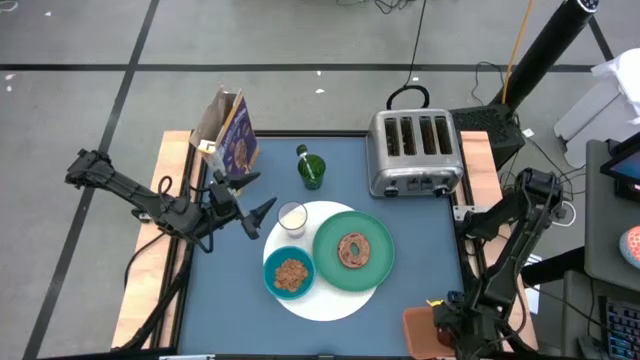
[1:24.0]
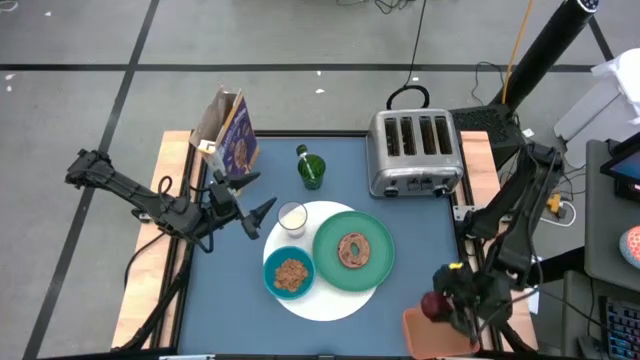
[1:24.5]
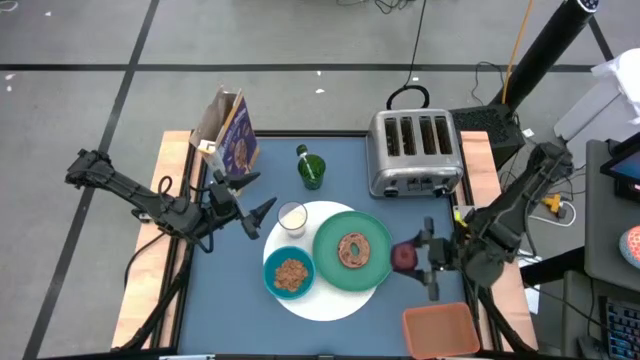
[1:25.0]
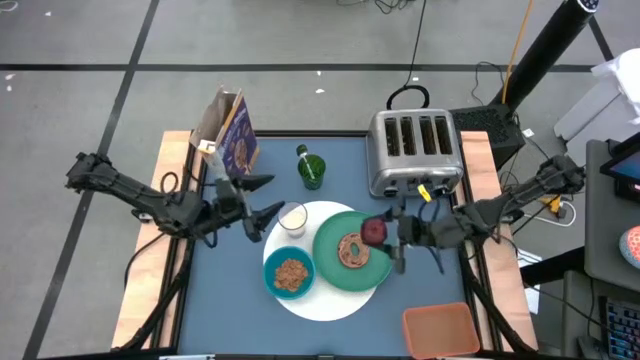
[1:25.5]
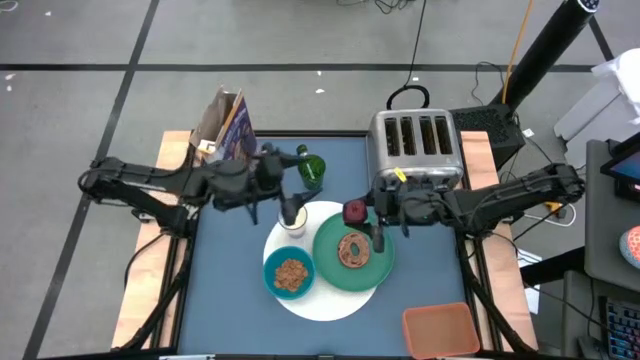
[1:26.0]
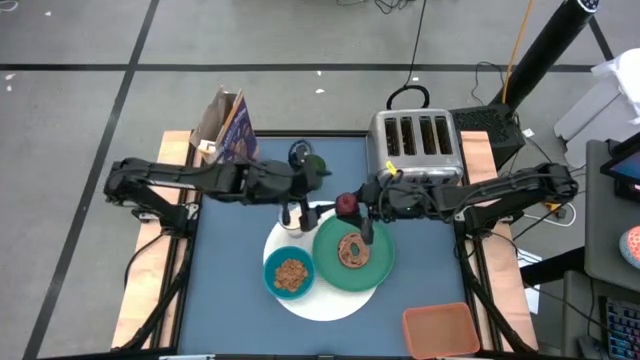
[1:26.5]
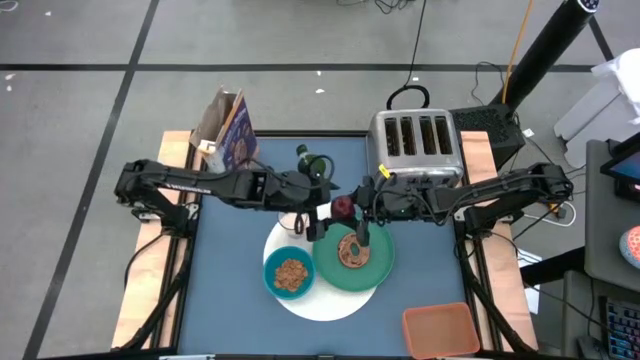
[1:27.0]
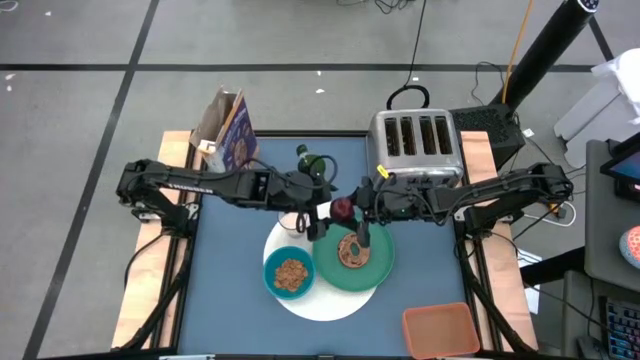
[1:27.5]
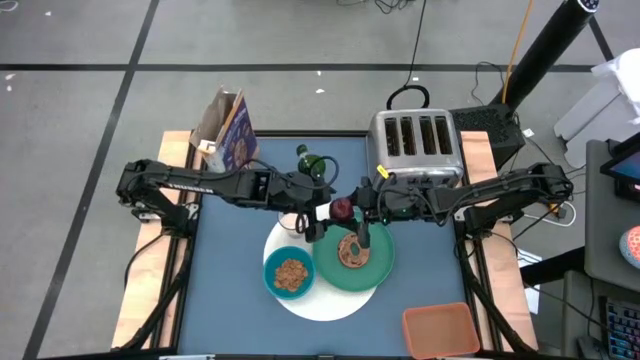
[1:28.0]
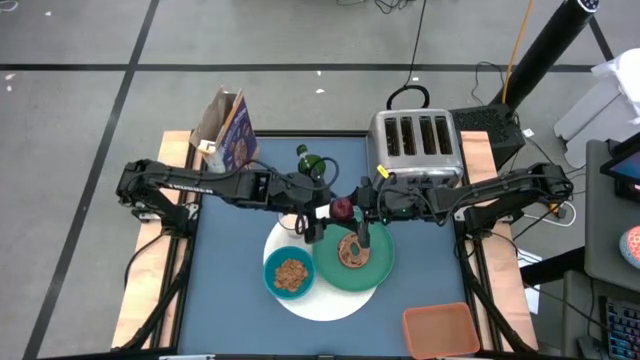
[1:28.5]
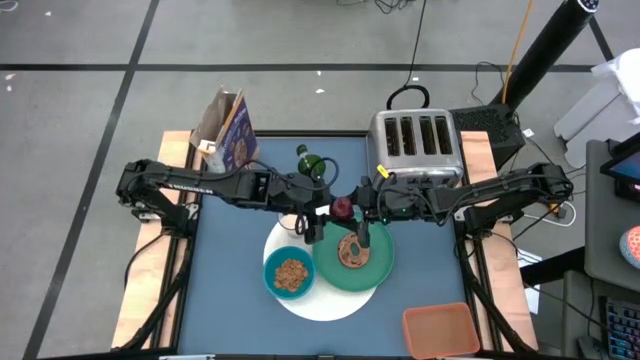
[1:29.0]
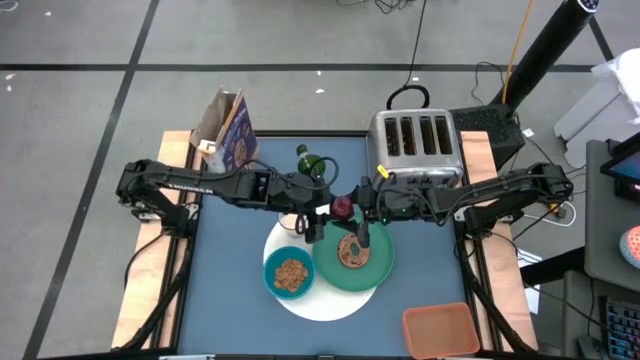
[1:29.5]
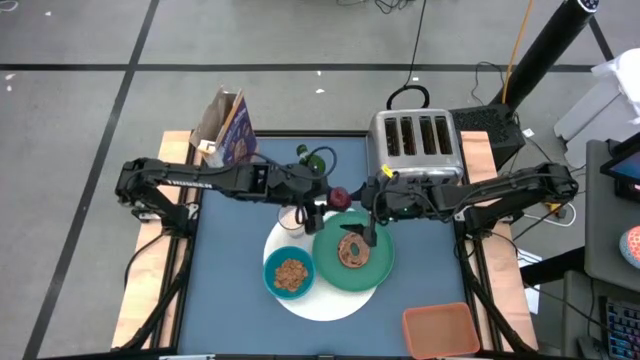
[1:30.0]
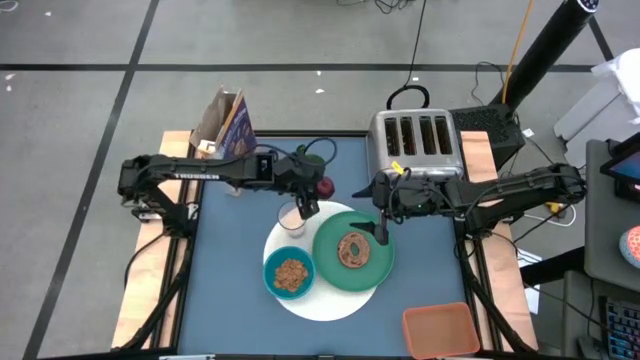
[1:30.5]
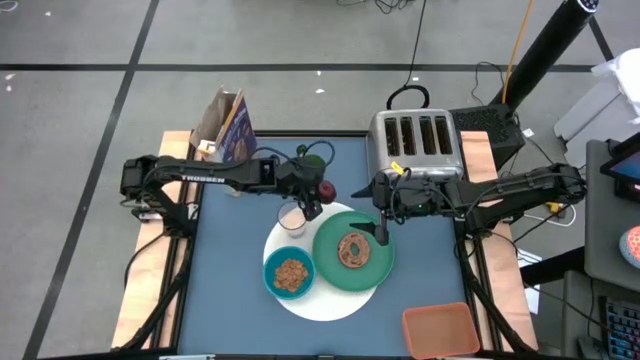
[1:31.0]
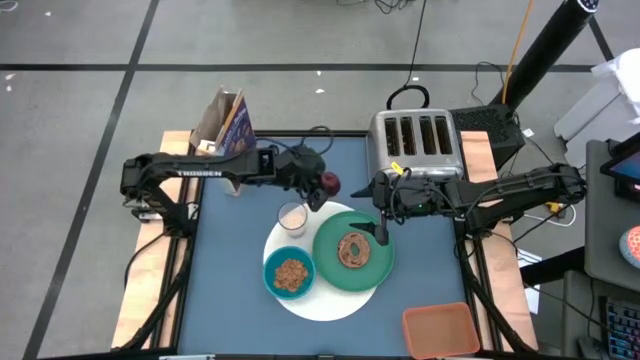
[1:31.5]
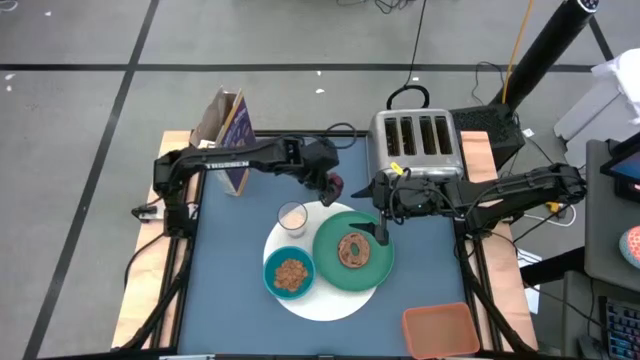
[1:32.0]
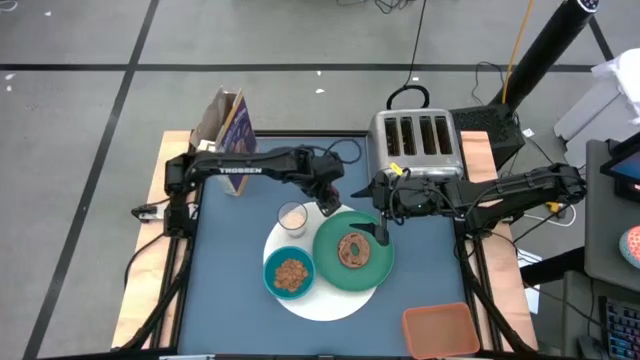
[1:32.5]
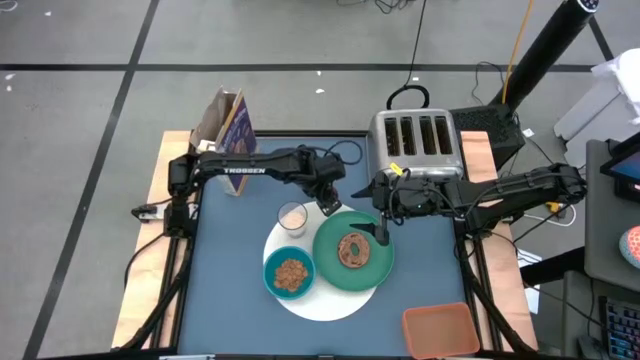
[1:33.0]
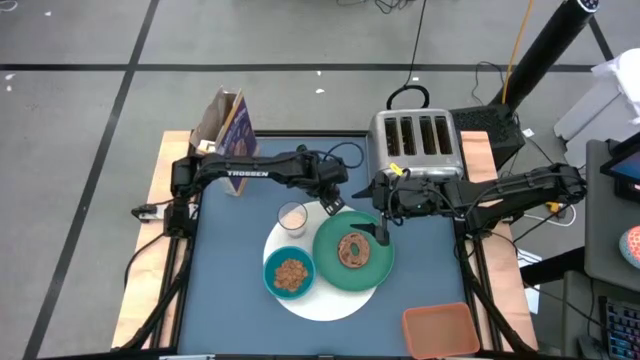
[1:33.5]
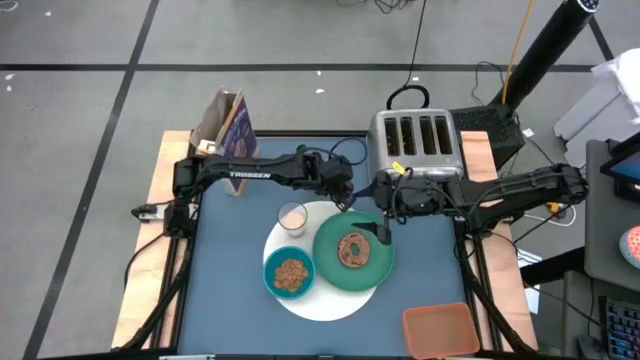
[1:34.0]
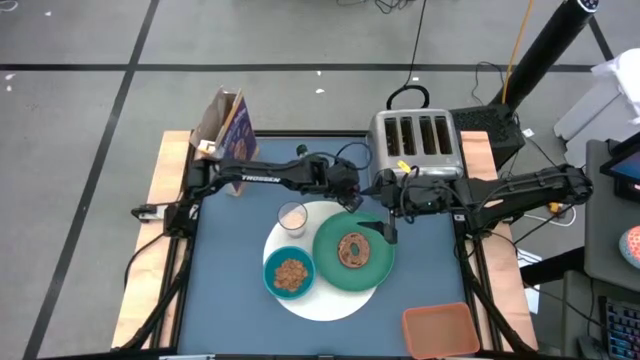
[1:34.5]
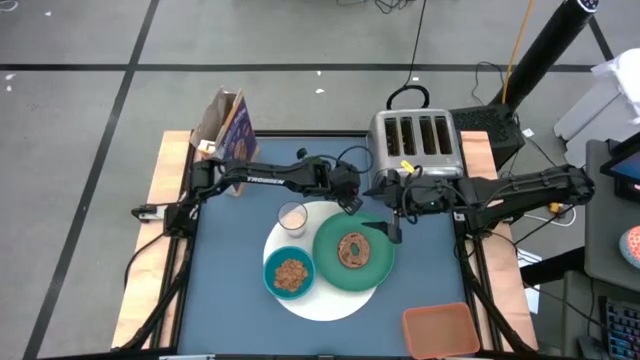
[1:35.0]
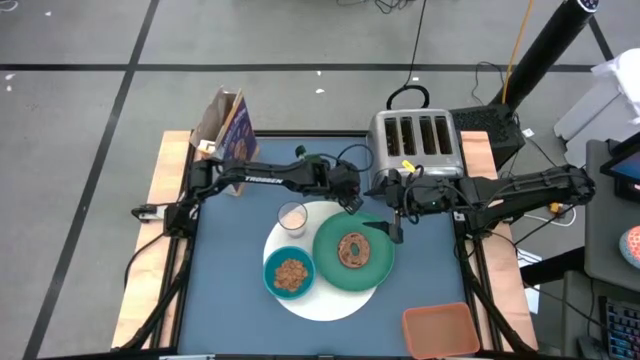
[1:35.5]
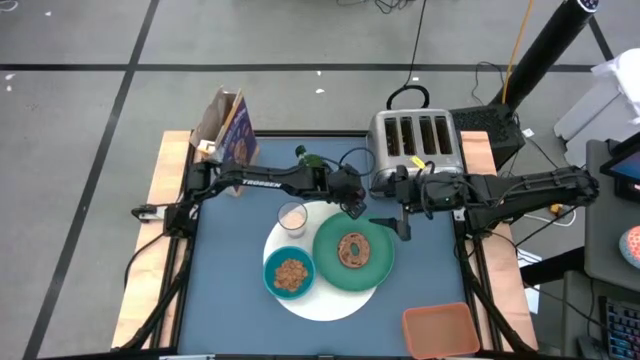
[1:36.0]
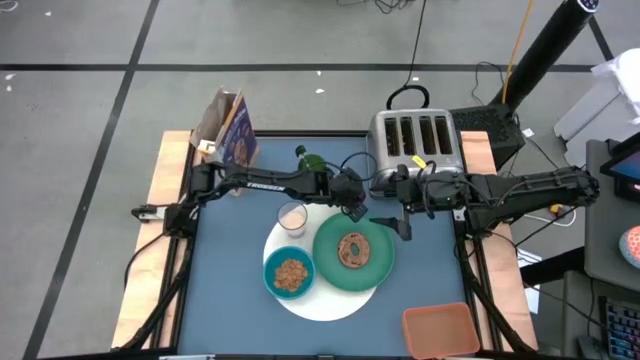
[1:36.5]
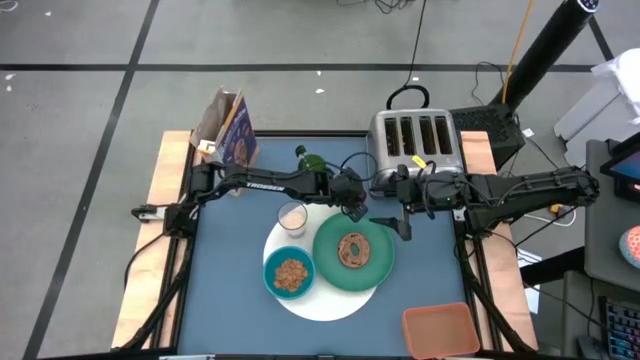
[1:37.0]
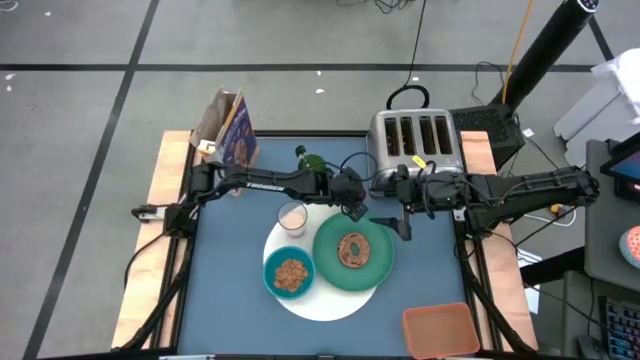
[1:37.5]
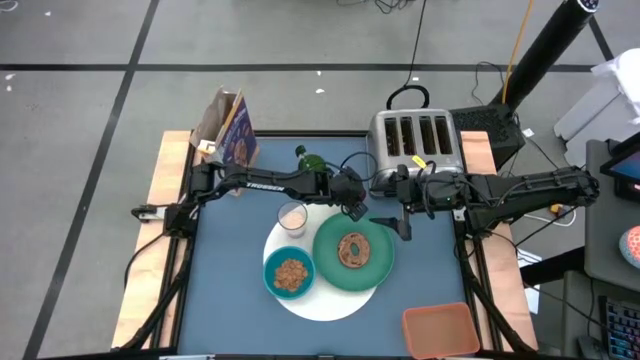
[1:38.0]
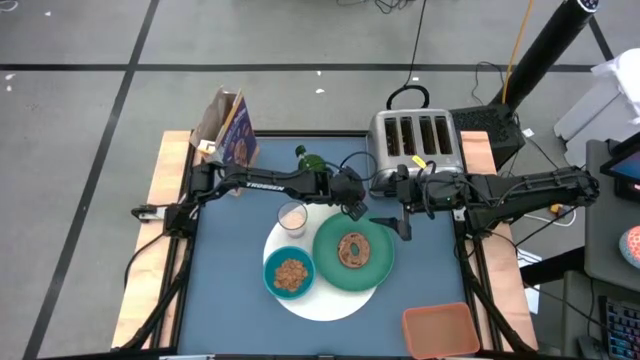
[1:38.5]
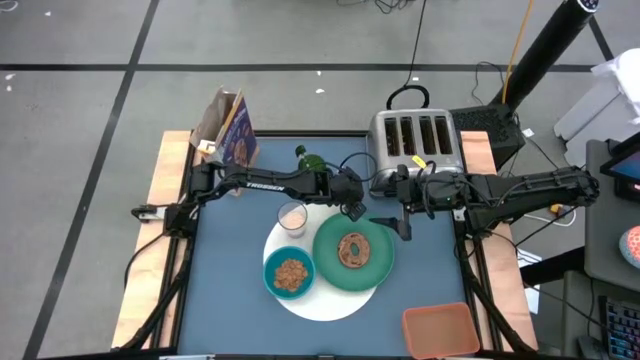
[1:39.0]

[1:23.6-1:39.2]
Task: Arrange a breakfast setting
Put the apple above the green plate from the orange bin

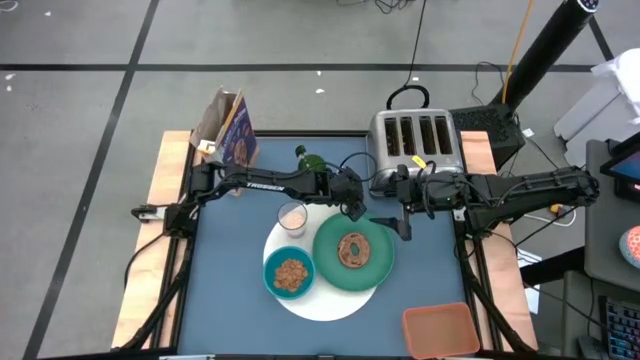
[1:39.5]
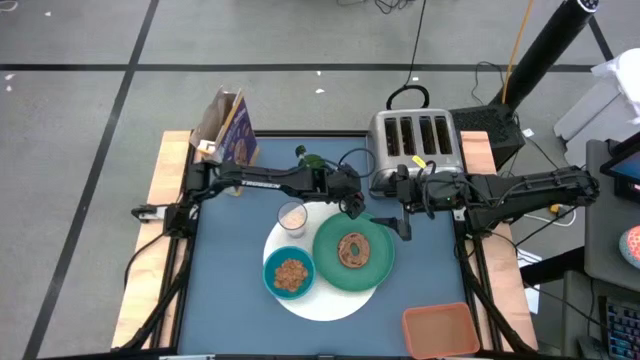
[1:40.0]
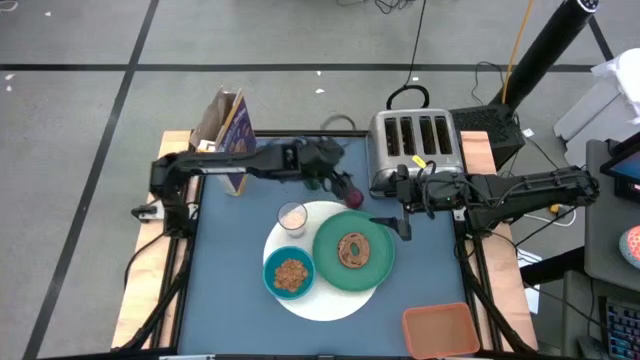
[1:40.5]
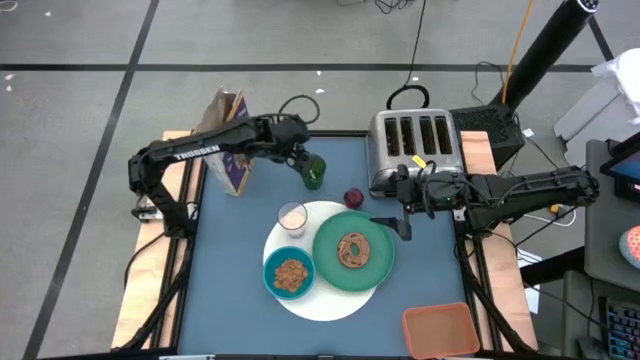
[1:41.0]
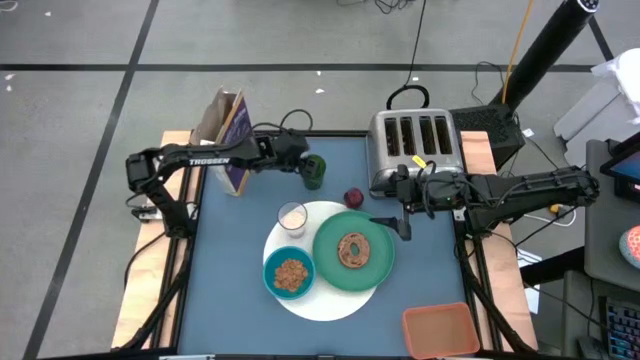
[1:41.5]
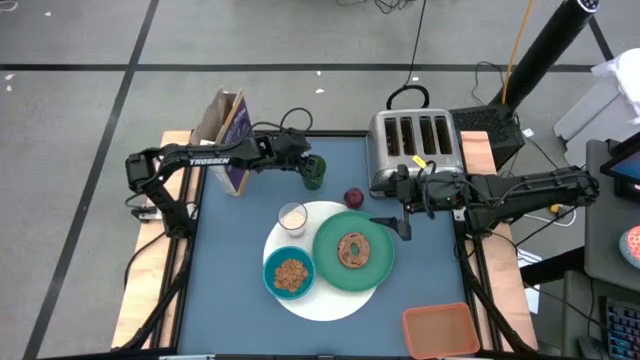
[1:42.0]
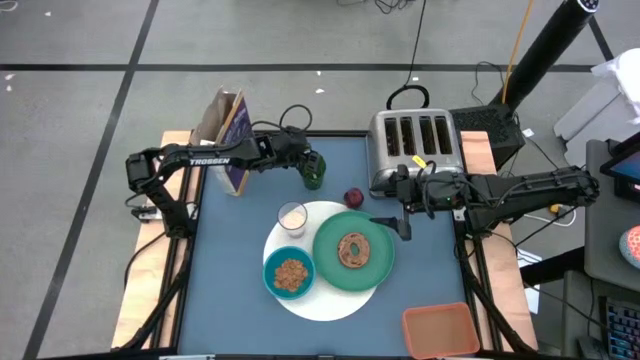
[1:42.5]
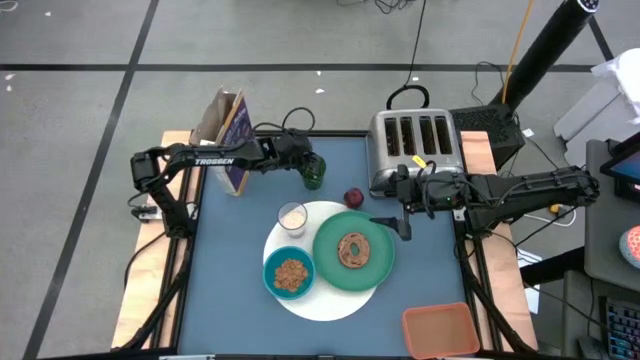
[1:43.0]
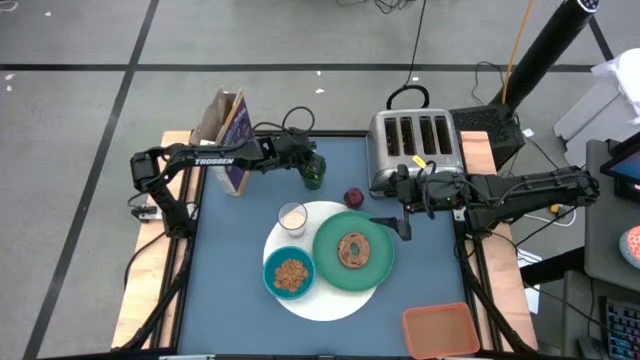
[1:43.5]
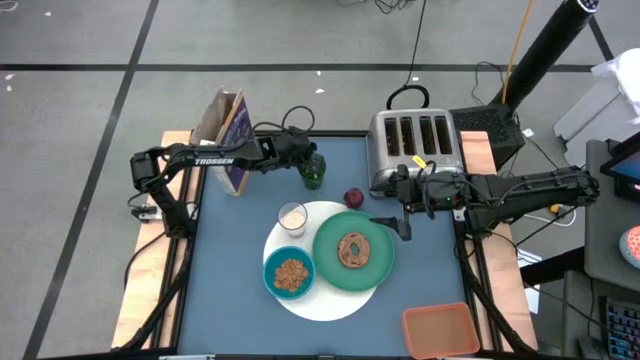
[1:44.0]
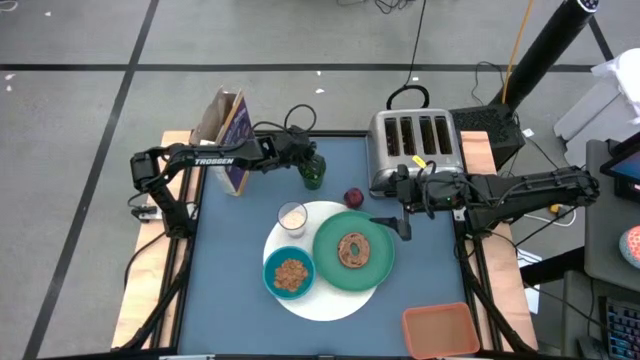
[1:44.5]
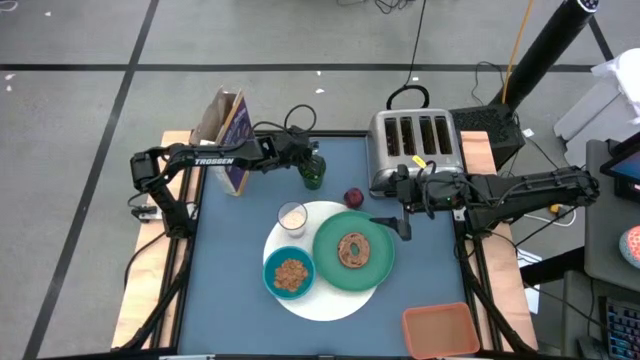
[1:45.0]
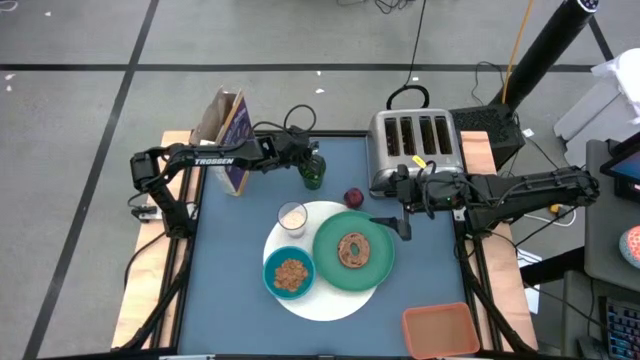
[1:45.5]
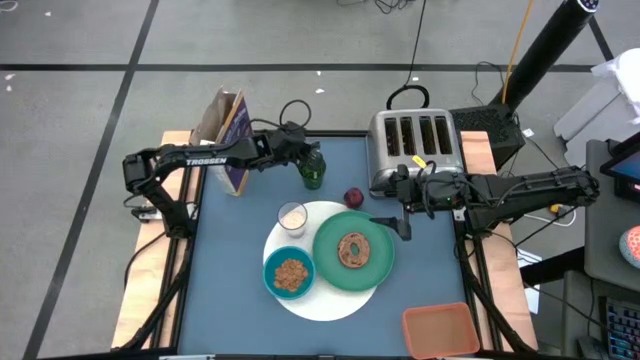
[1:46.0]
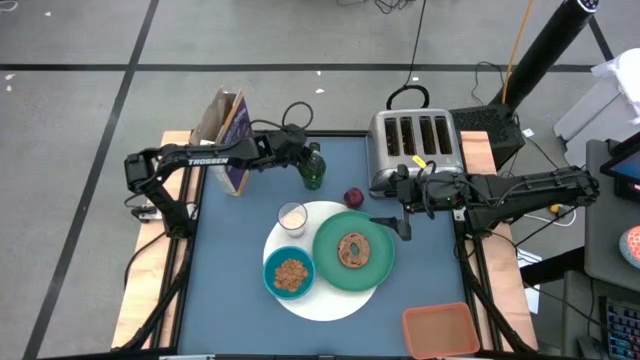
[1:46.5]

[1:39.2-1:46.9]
Put the spoon beside the blue bowl from the green drinking glass
